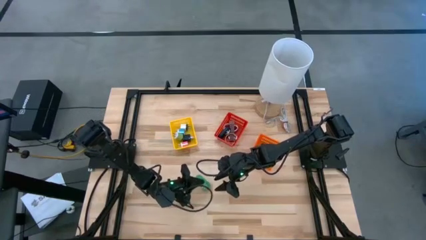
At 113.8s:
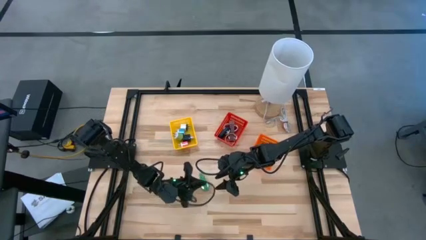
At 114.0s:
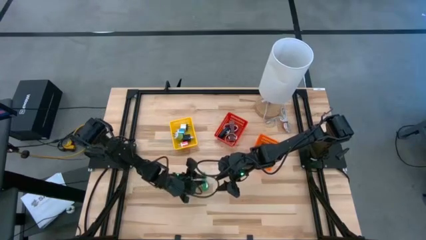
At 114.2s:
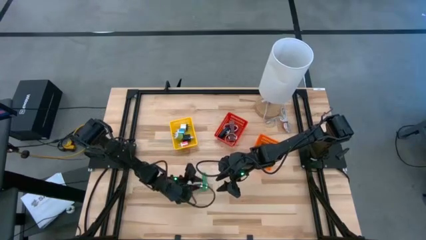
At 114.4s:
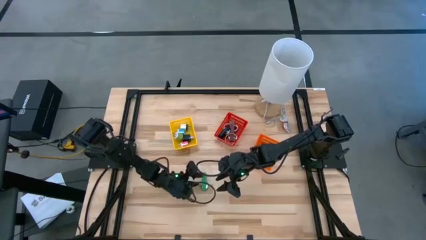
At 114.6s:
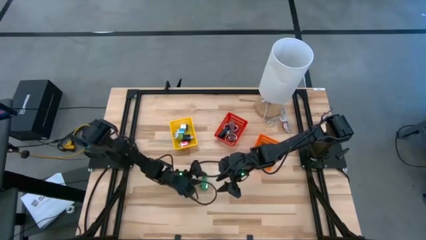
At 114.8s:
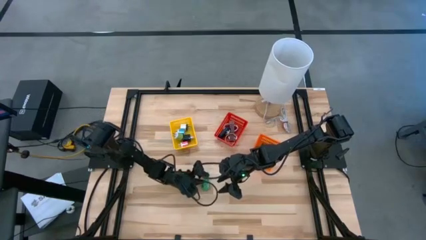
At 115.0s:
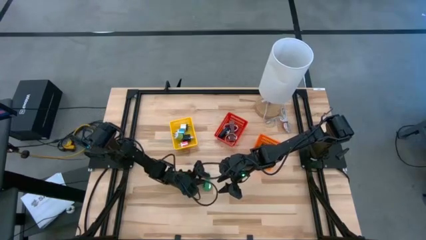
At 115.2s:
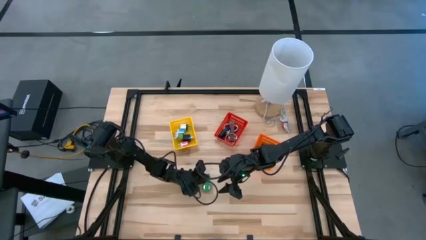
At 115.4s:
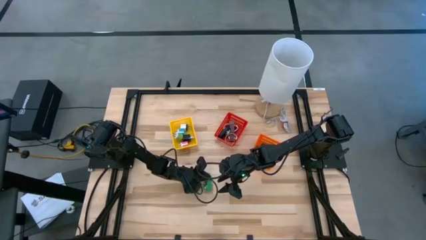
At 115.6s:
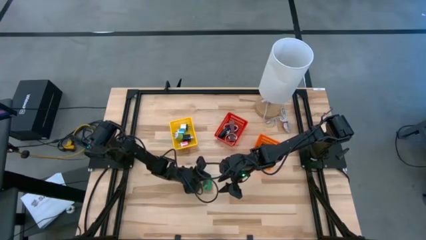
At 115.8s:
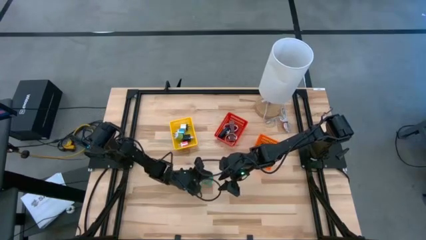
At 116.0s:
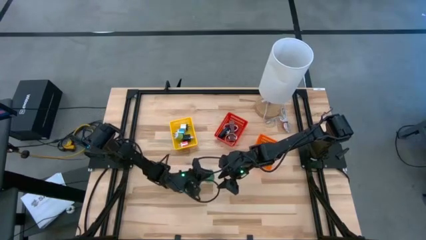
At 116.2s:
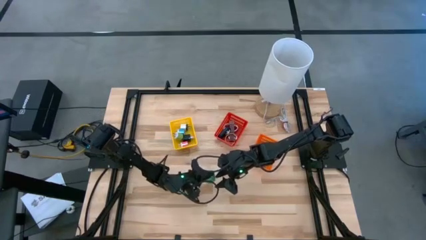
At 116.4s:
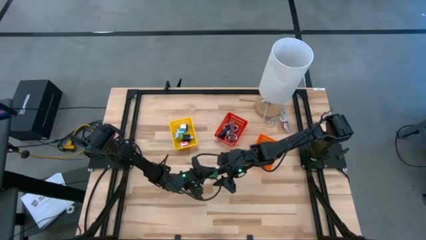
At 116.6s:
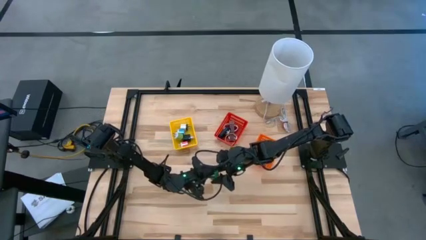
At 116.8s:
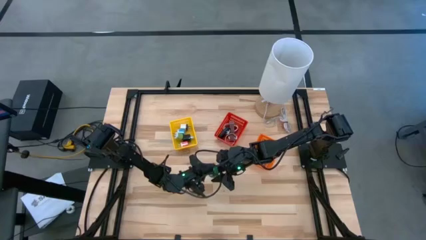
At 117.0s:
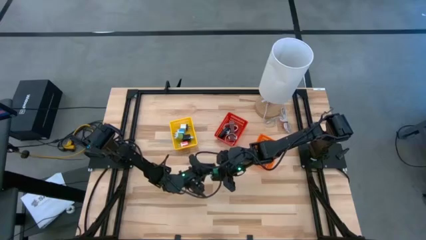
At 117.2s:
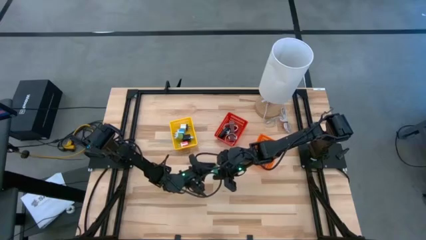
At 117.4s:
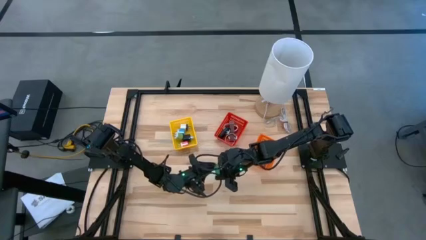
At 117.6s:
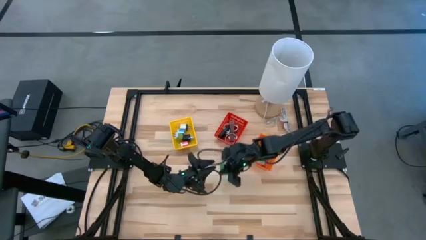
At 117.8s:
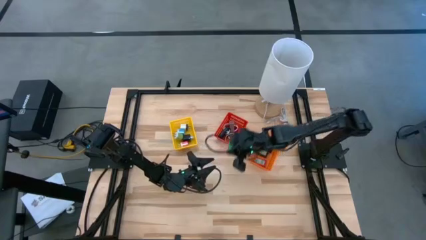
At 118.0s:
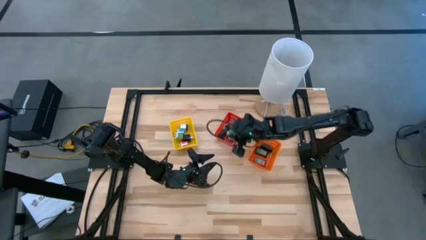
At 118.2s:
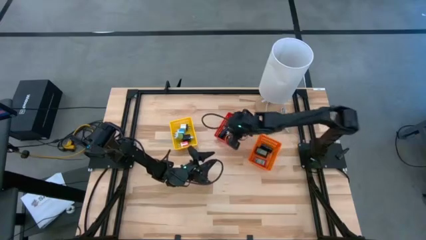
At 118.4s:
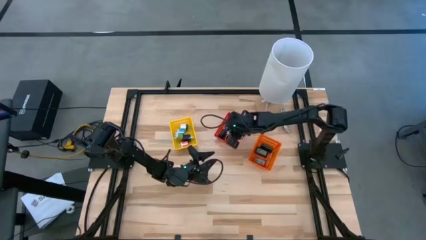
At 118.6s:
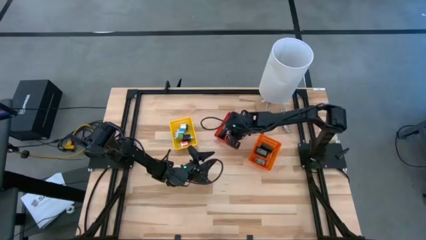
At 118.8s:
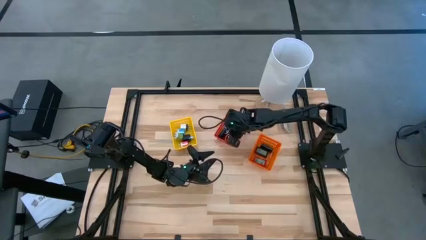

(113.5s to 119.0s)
Task: Pick & Place Office items
Put the green watch into the red basket

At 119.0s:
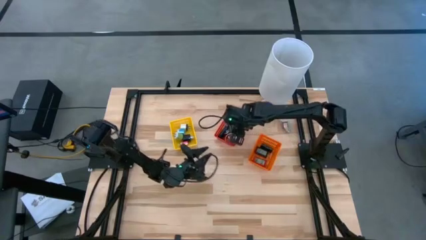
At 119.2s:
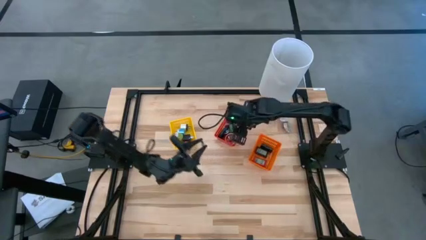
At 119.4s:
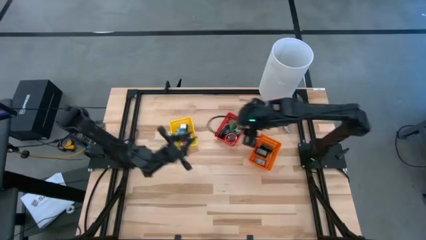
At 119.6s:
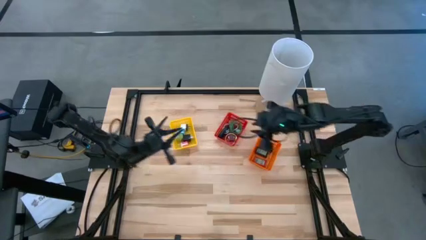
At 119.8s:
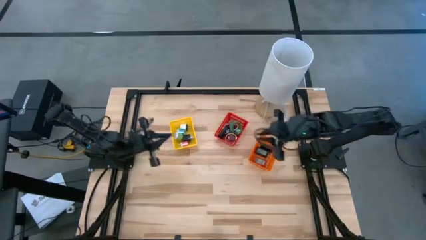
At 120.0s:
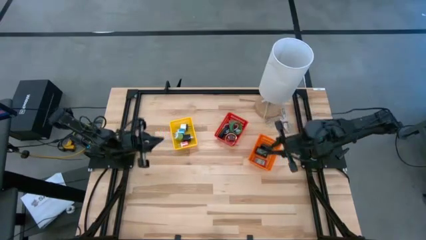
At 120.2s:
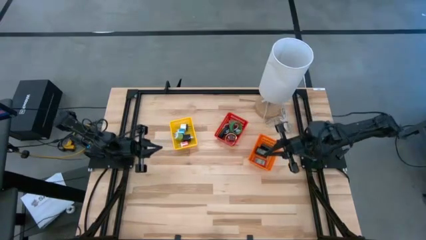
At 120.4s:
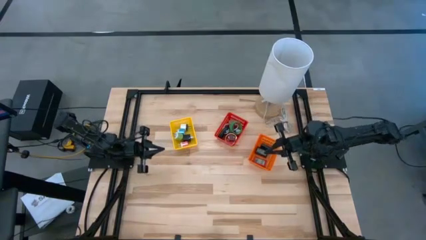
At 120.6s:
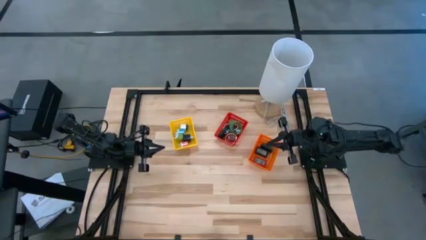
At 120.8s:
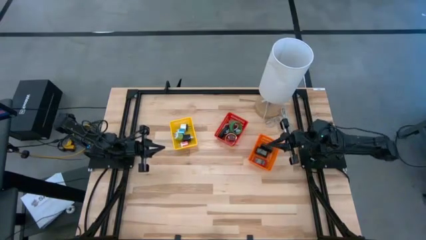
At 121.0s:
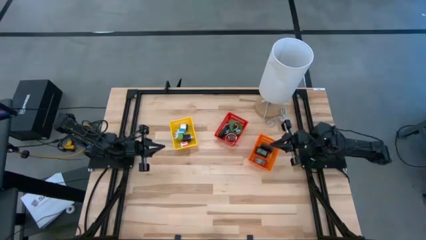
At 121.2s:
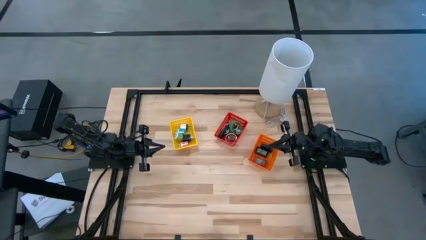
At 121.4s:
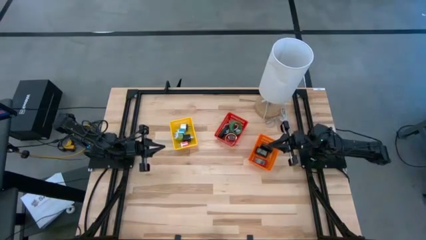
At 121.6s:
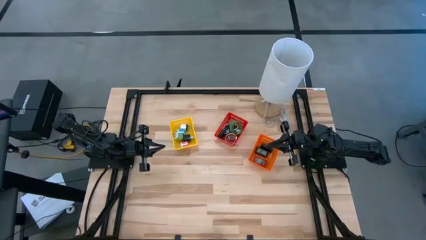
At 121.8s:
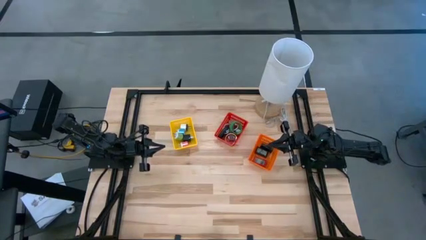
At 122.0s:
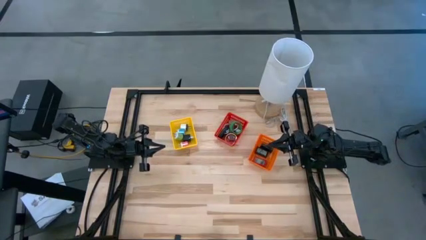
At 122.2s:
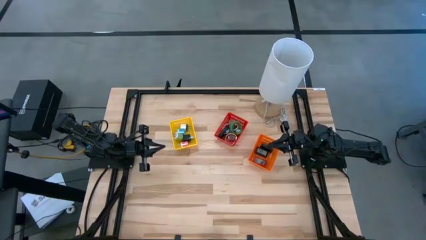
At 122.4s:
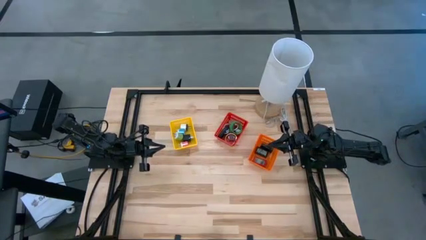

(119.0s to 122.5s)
Return to home position

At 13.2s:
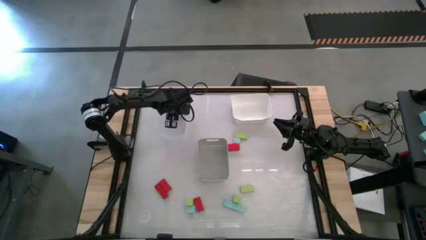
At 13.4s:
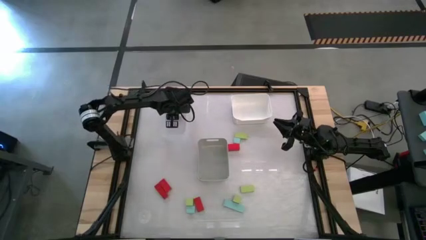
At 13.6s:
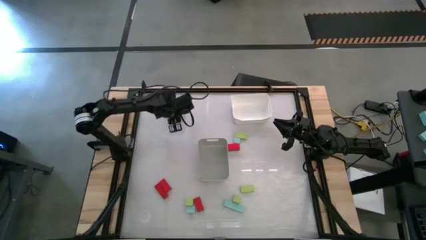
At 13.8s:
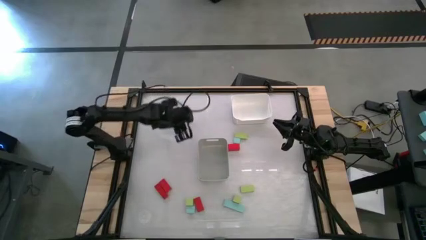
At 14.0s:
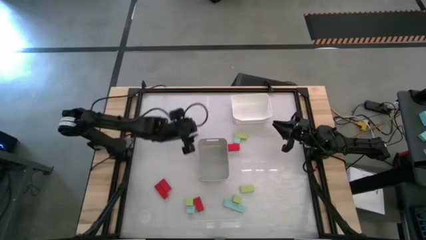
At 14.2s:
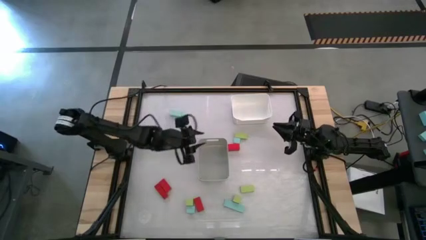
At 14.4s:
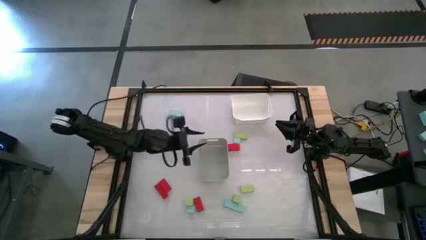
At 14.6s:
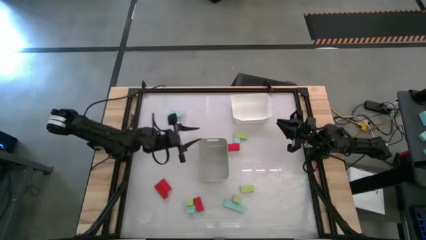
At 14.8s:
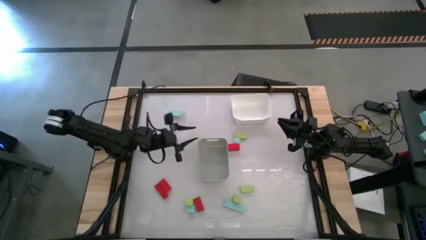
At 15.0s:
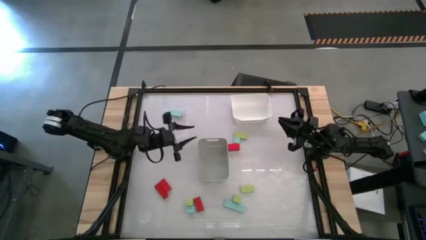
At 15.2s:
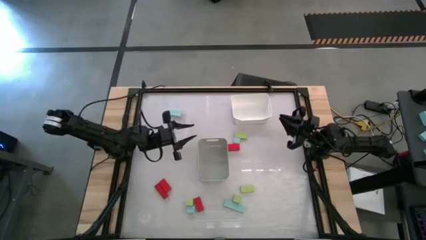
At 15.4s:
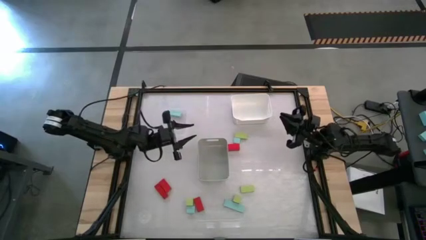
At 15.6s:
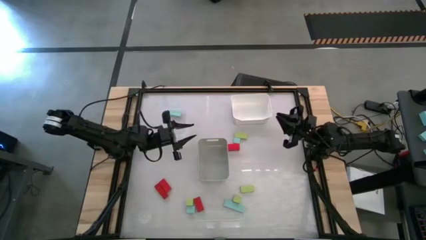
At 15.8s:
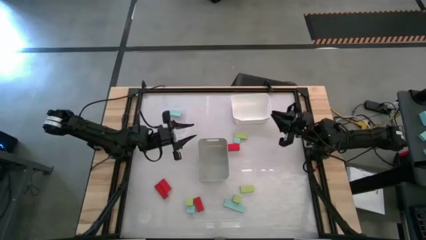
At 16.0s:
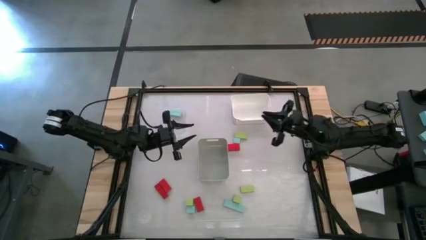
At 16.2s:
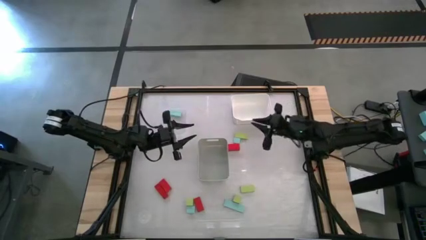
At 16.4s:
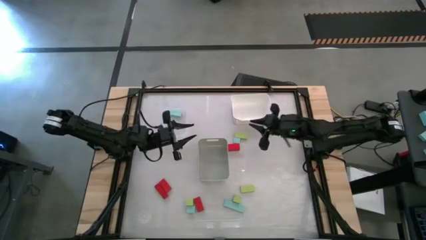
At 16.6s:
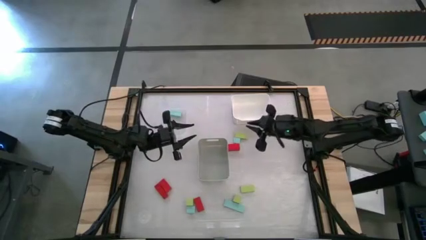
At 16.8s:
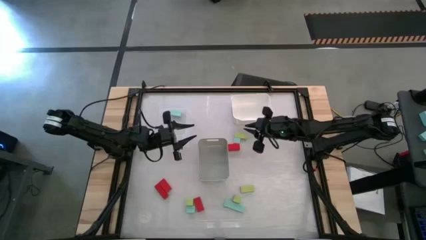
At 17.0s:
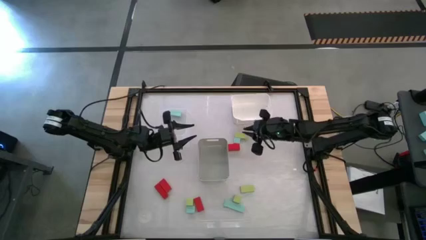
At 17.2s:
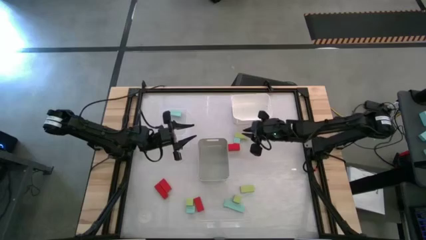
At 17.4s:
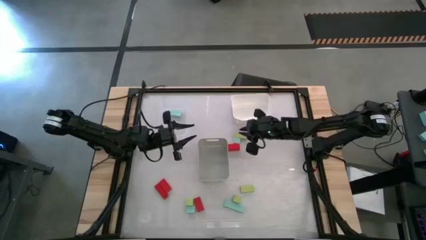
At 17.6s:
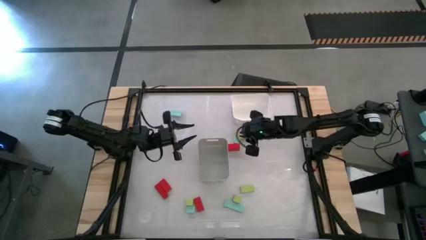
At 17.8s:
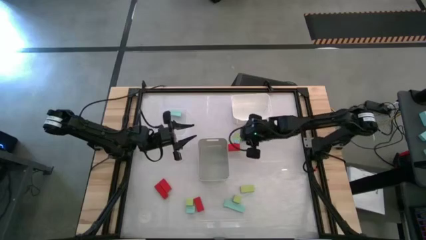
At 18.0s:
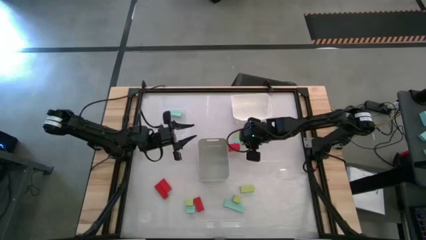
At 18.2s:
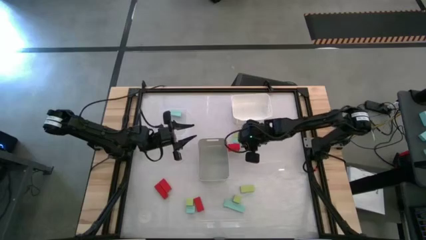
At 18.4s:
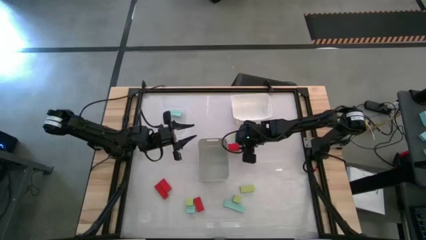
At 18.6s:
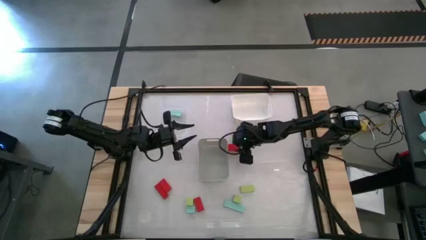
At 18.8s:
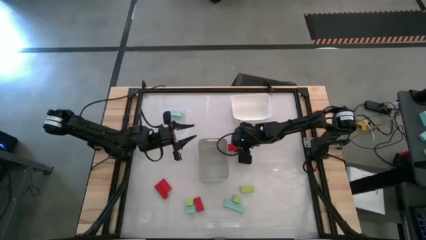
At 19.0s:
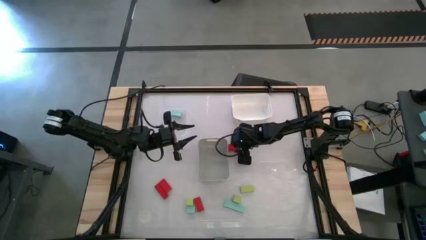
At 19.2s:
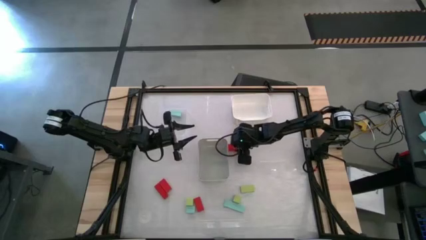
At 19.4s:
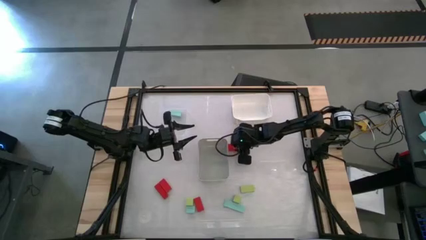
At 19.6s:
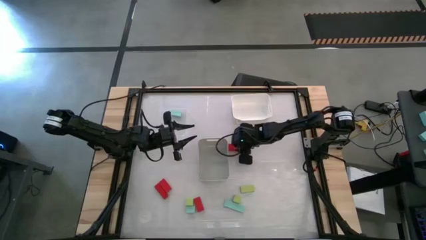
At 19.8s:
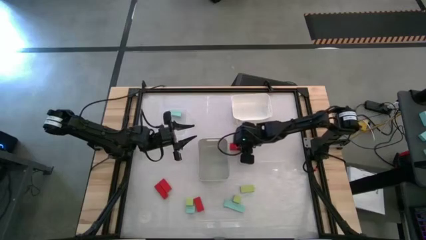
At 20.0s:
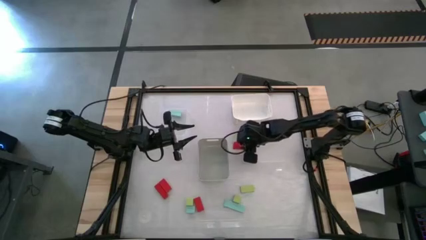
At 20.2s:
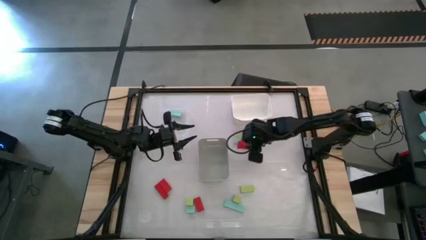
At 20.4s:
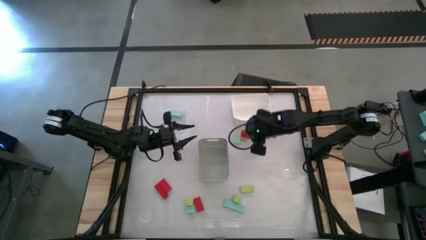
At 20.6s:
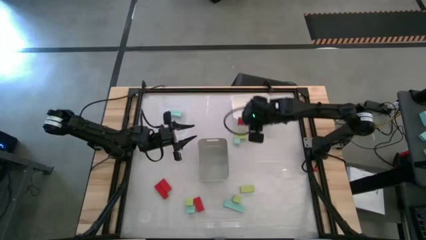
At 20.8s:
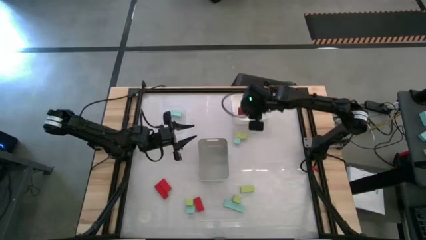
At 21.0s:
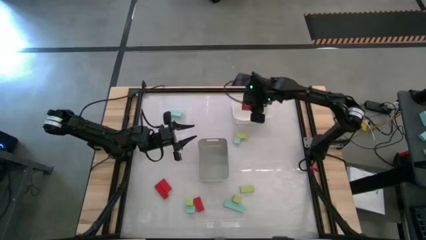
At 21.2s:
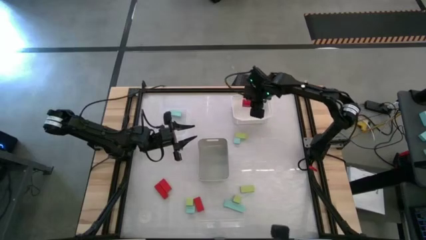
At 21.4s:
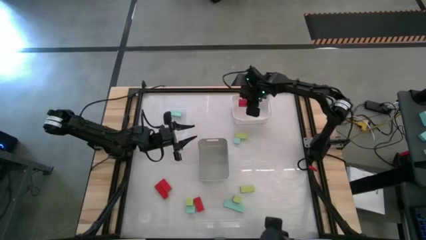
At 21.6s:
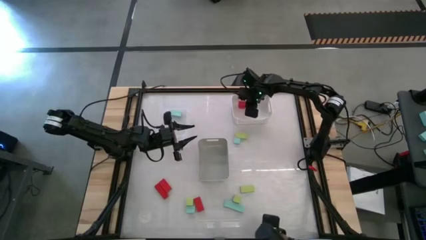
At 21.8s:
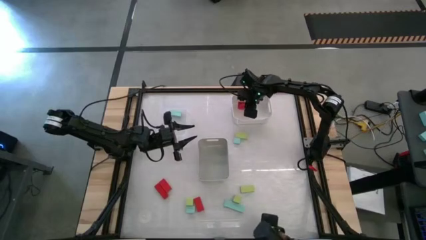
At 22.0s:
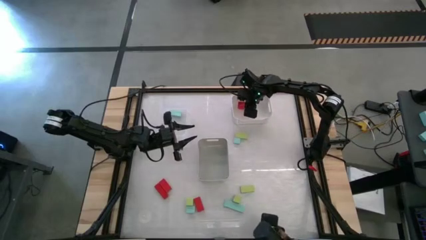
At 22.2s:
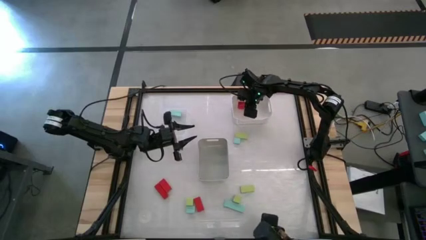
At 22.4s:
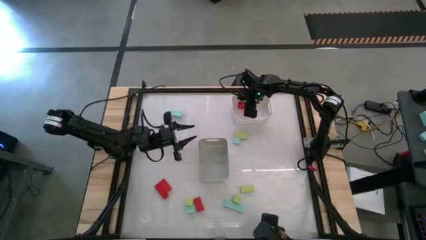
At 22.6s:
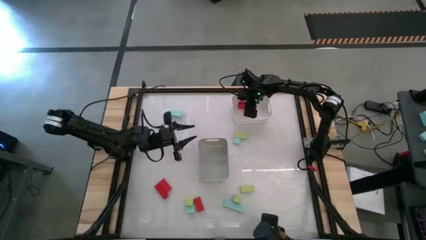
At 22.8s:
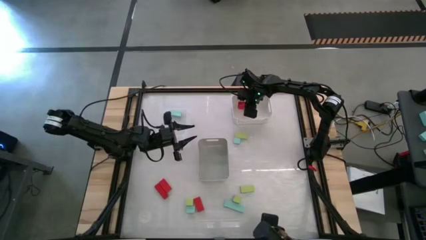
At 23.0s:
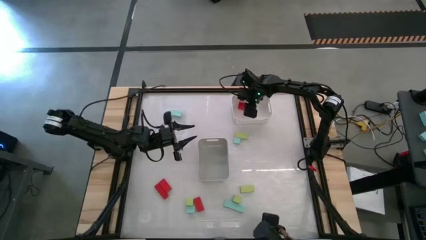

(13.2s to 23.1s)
Task: Sort & place blocks by color
Put the red block into the white bin
